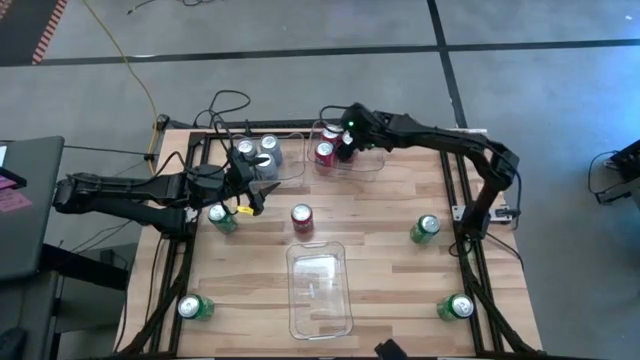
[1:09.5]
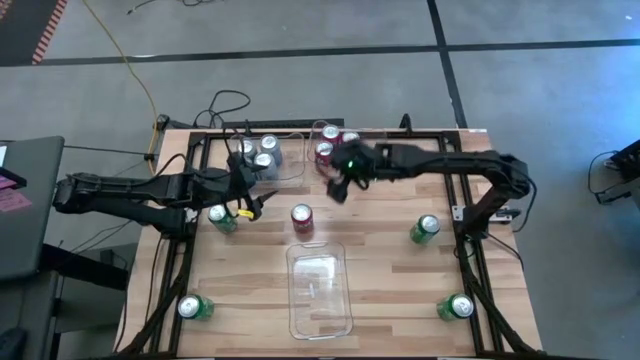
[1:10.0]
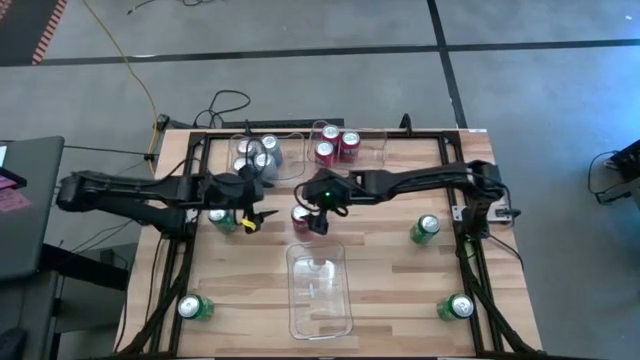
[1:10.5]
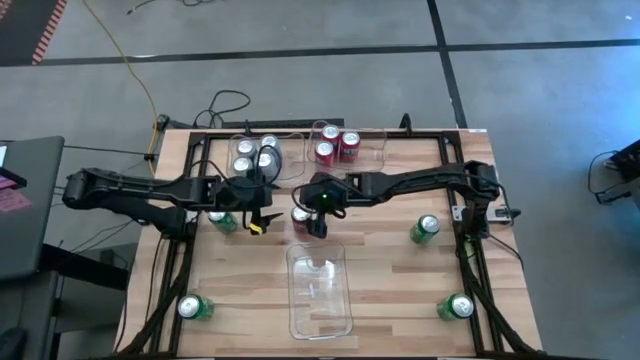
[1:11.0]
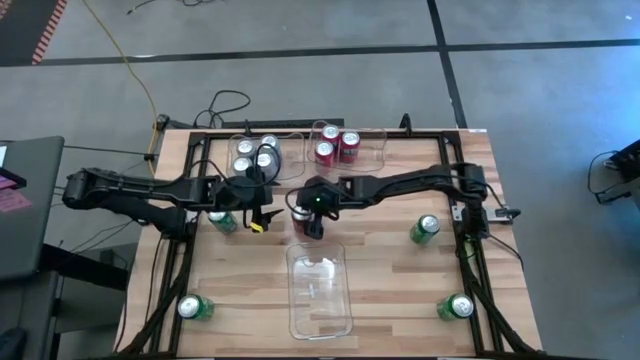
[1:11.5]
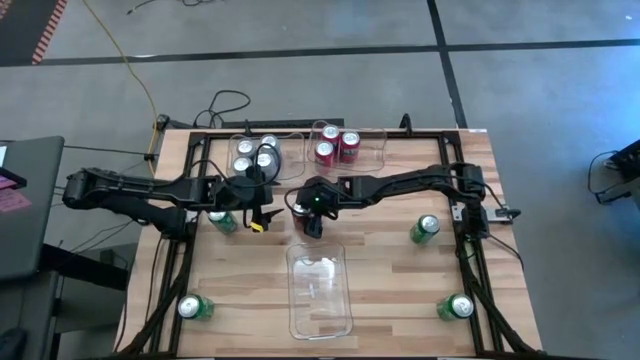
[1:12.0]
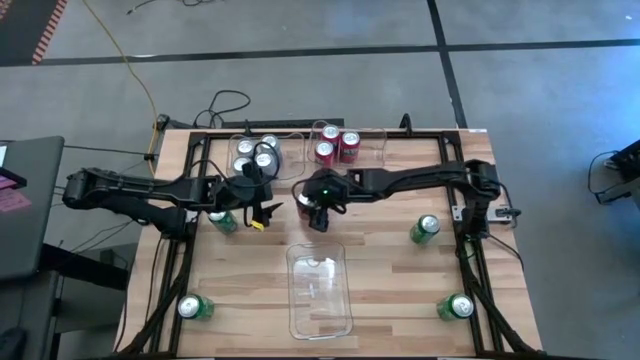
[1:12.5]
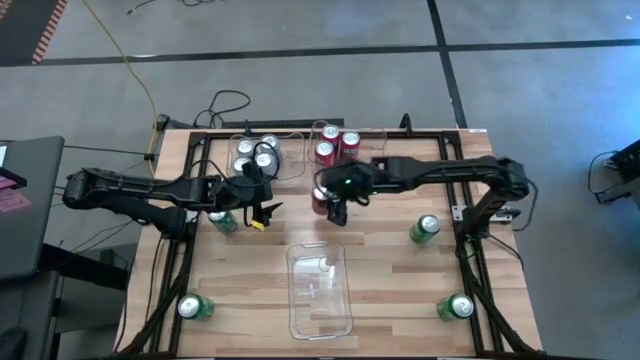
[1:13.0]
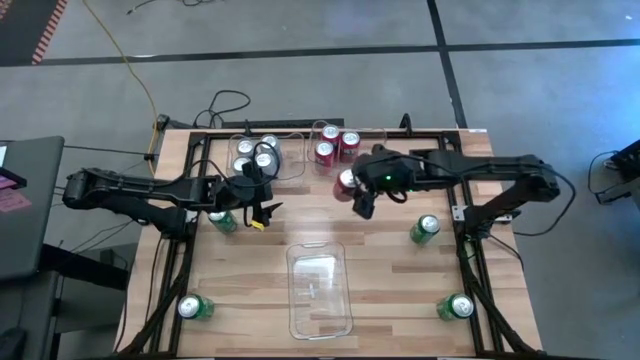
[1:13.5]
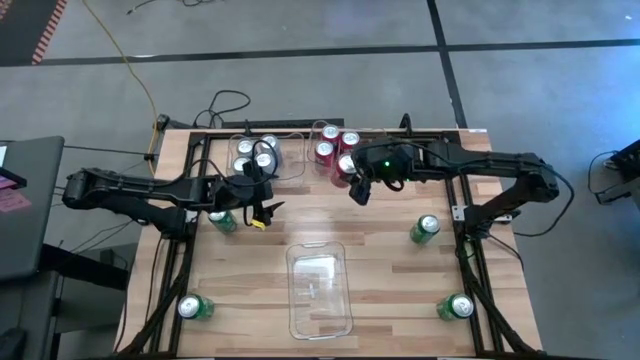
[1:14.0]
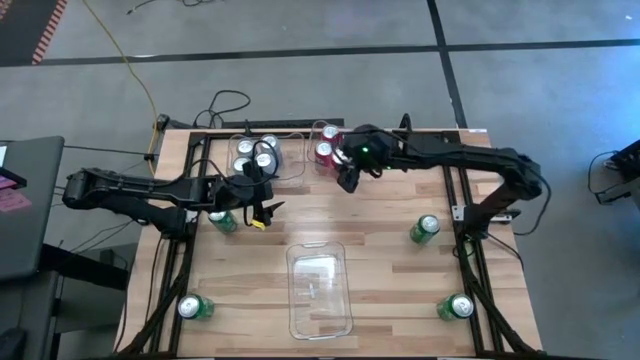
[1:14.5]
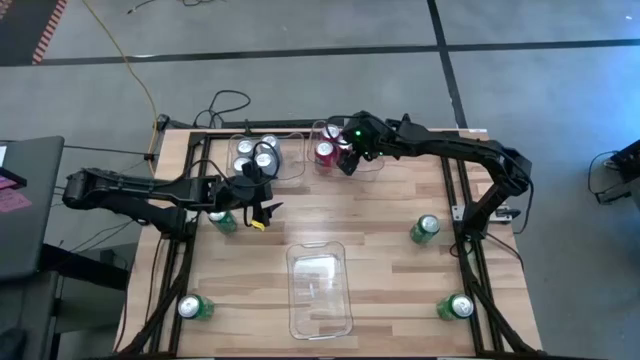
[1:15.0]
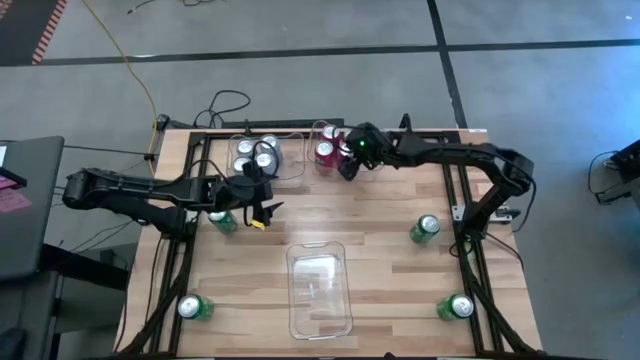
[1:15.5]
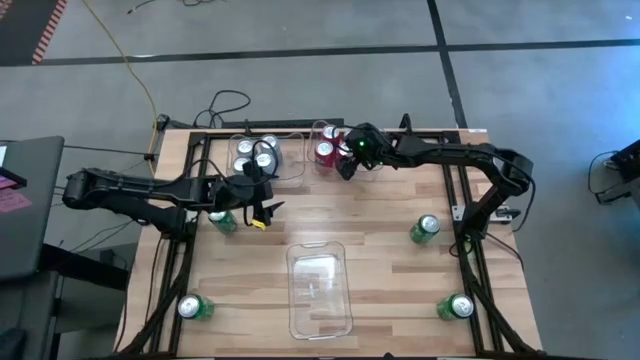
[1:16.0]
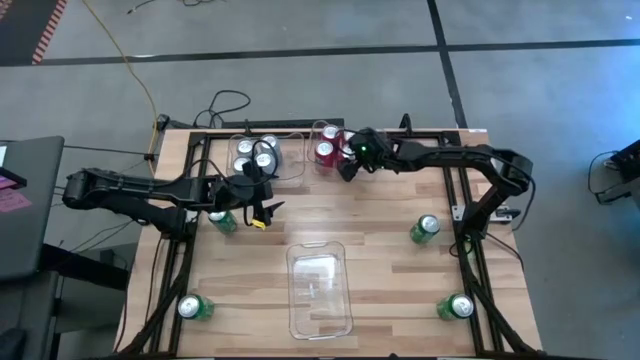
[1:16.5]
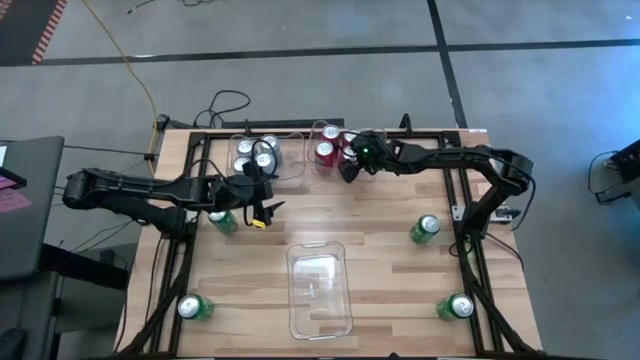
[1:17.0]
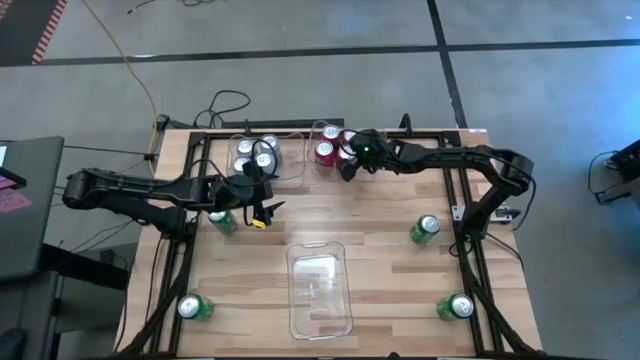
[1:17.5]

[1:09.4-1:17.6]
Task: Sort soda cans
Put the red soda can into the top right transparent bin

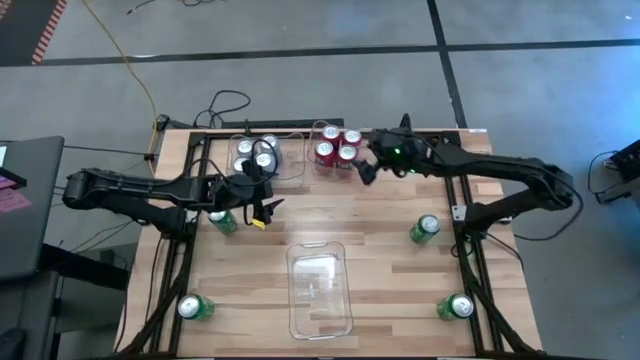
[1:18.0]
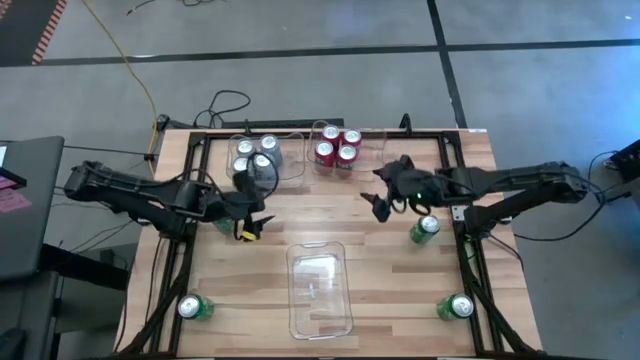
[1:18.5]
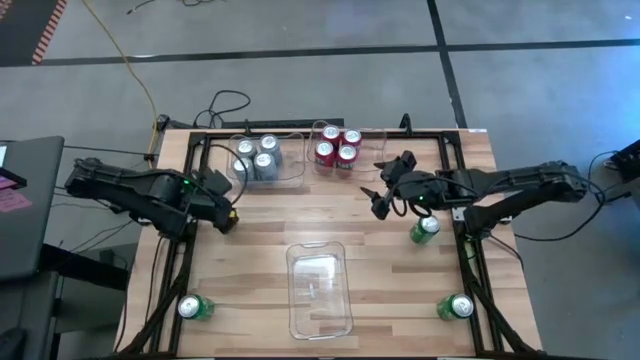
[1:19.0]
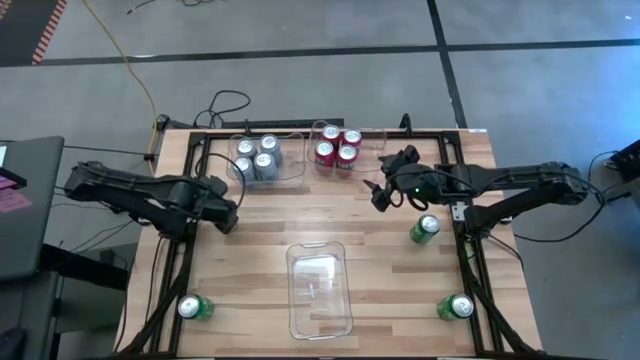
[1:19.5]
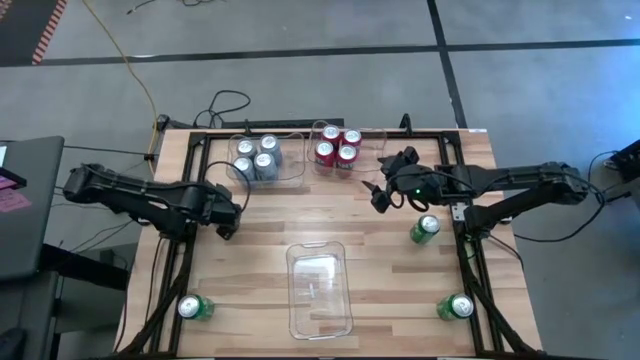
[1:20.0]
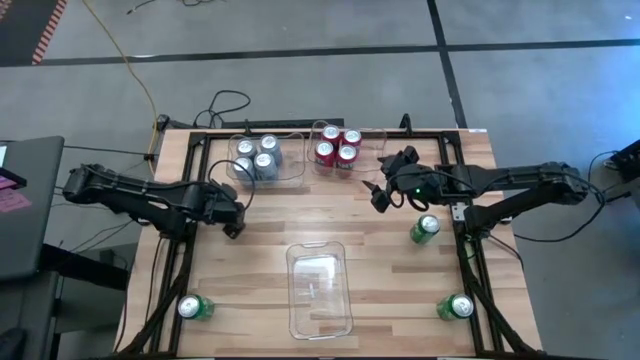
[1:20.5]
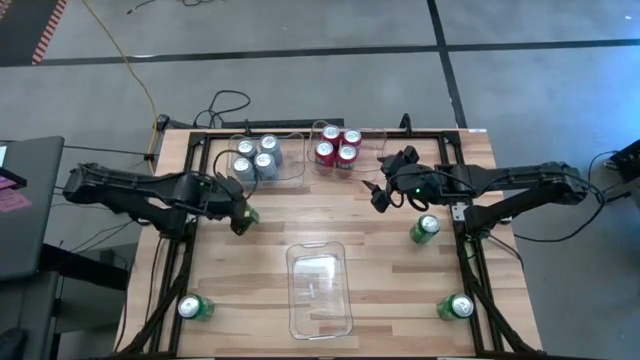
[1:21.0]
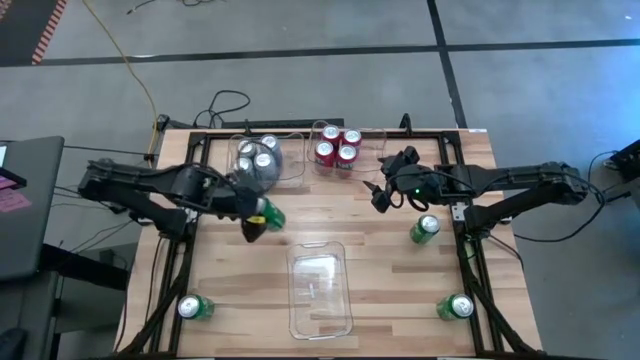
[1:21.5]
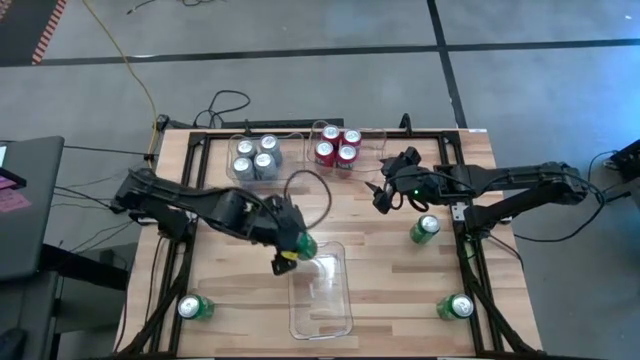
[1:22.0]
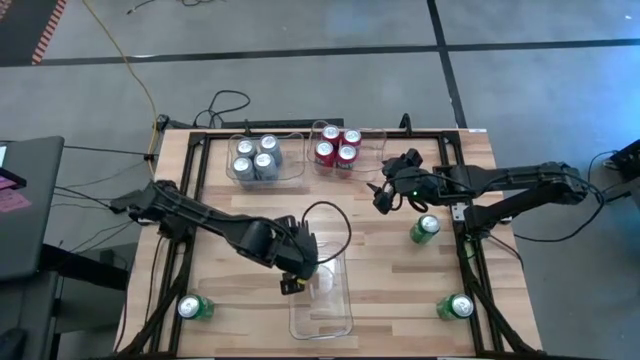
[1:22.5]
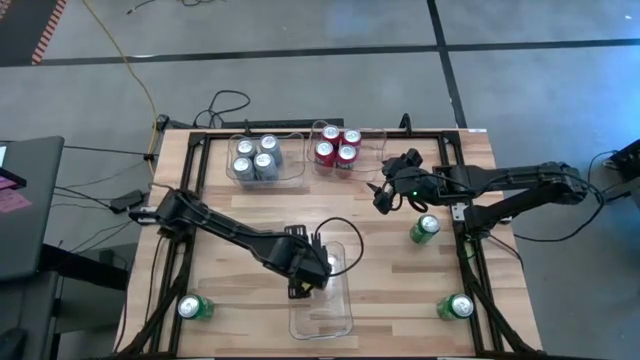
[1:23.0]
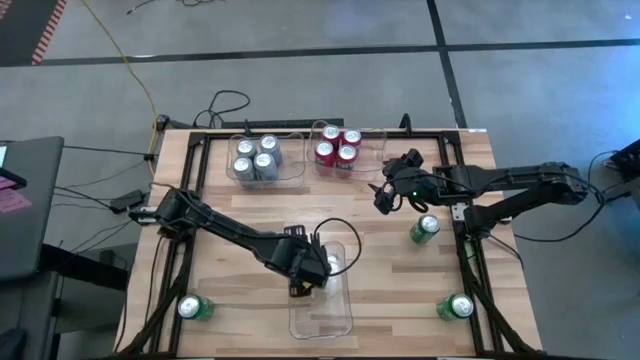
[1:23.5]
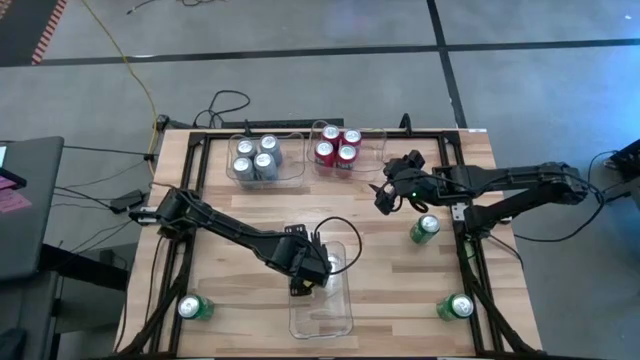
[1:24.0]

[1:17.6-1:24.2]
Put the top left green soda can into the bottom transparent bin
